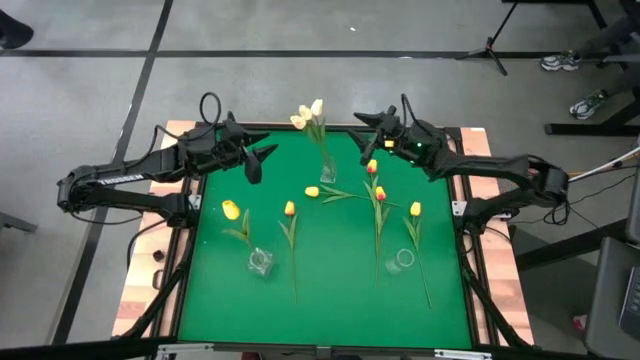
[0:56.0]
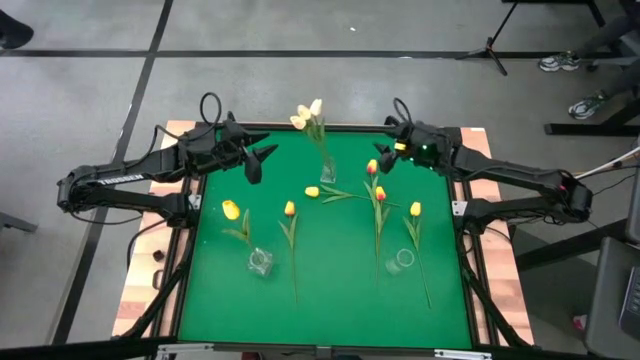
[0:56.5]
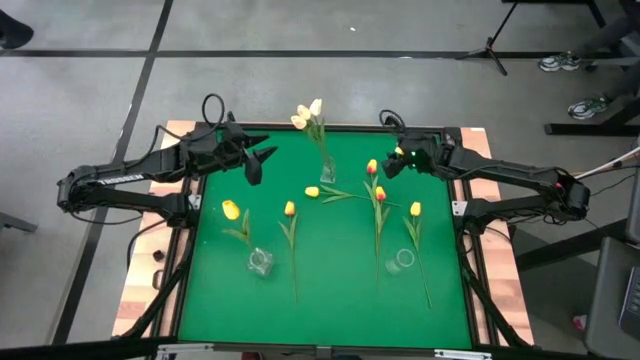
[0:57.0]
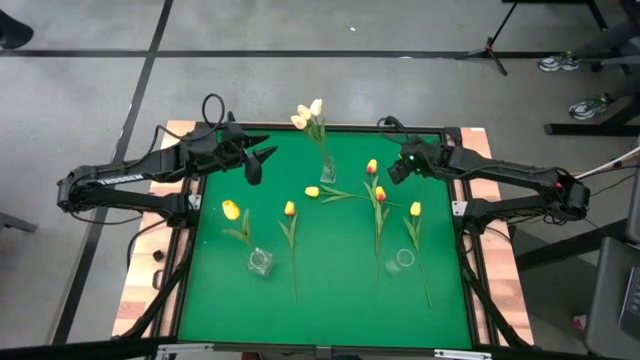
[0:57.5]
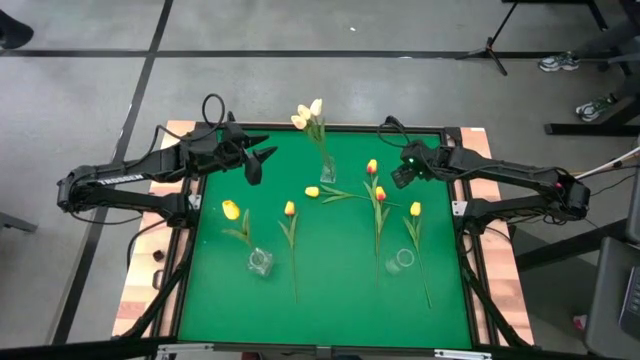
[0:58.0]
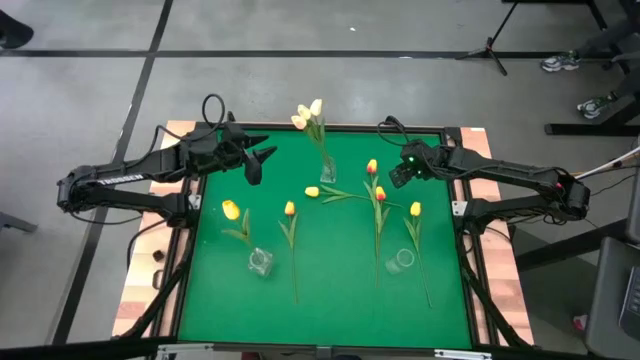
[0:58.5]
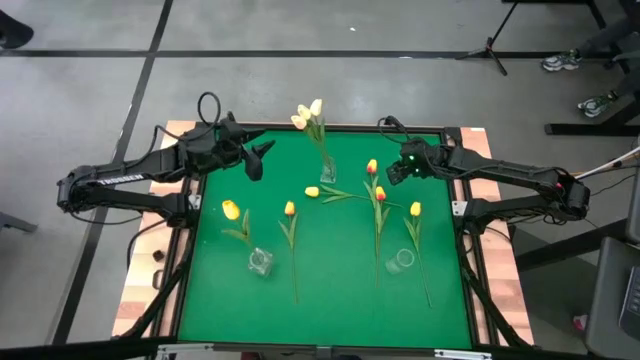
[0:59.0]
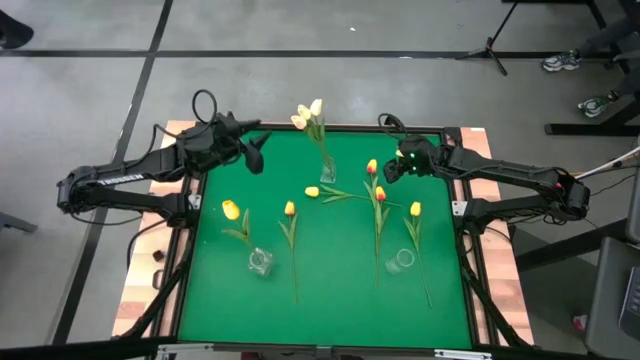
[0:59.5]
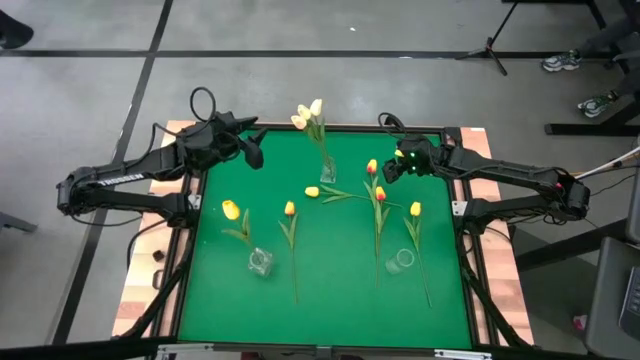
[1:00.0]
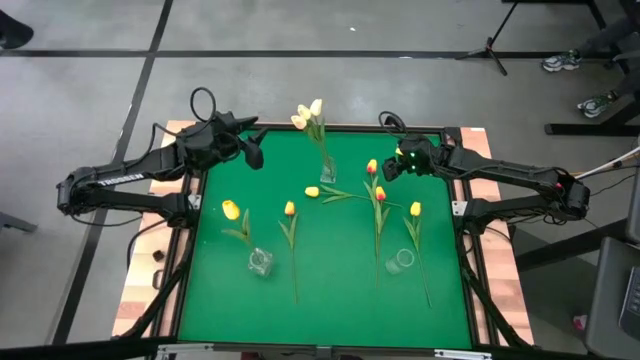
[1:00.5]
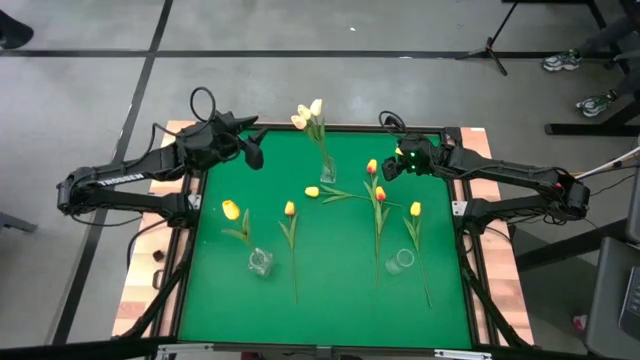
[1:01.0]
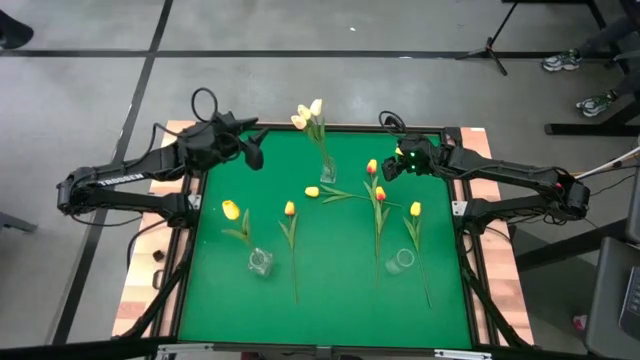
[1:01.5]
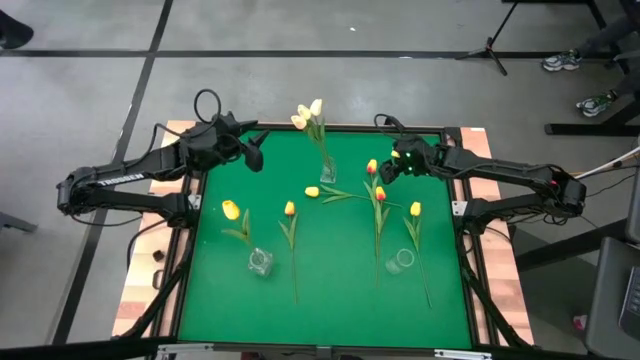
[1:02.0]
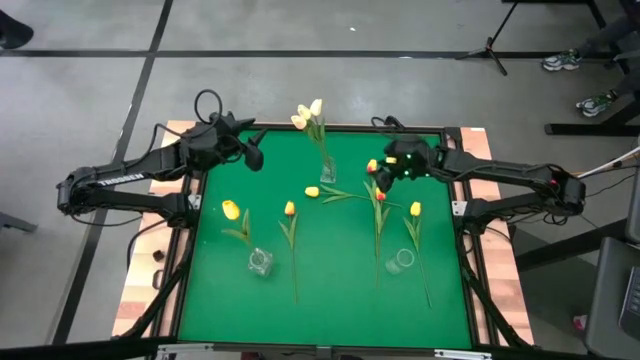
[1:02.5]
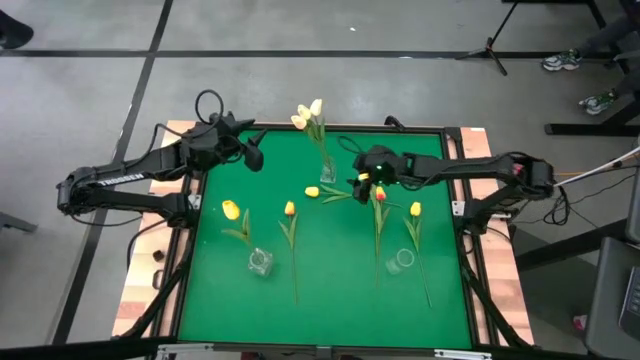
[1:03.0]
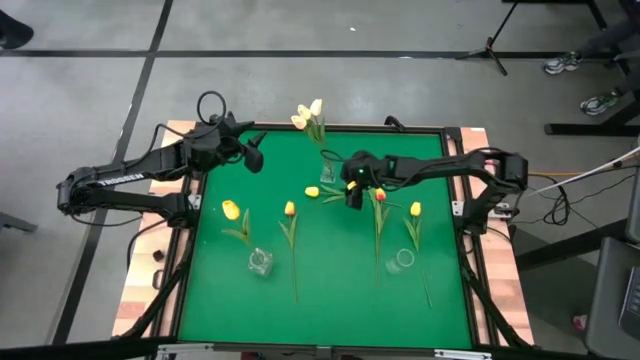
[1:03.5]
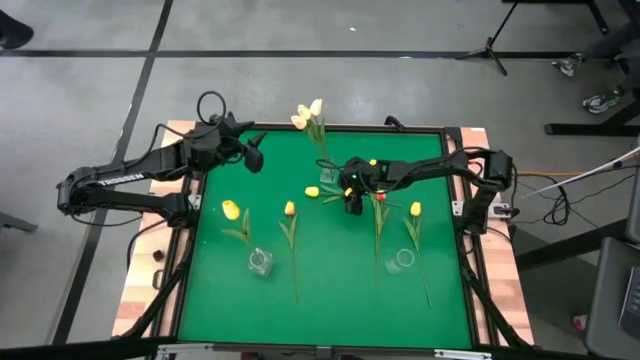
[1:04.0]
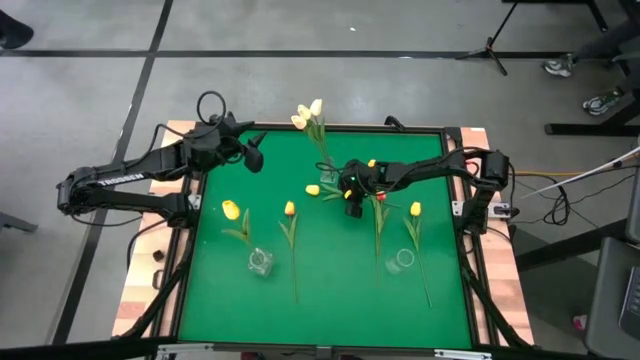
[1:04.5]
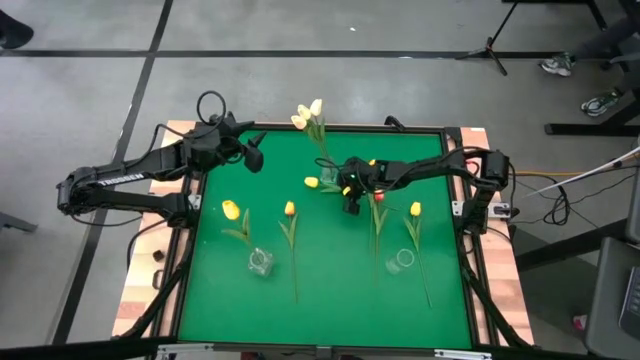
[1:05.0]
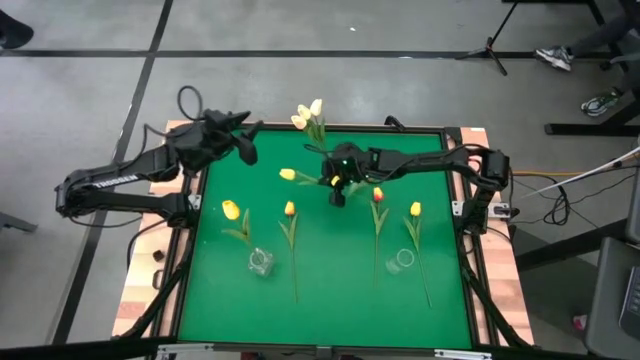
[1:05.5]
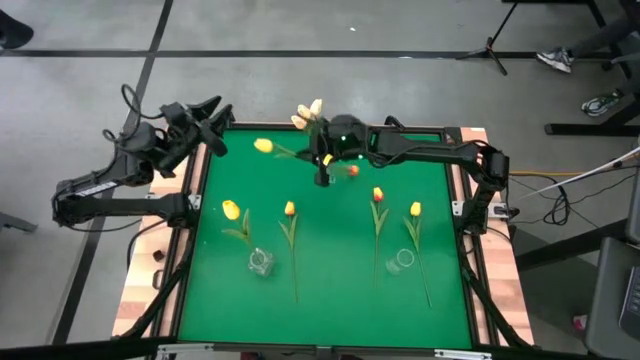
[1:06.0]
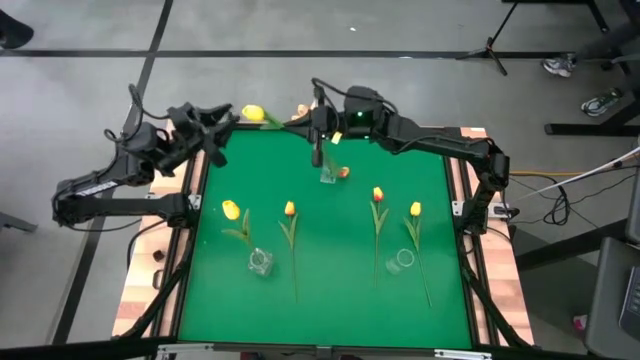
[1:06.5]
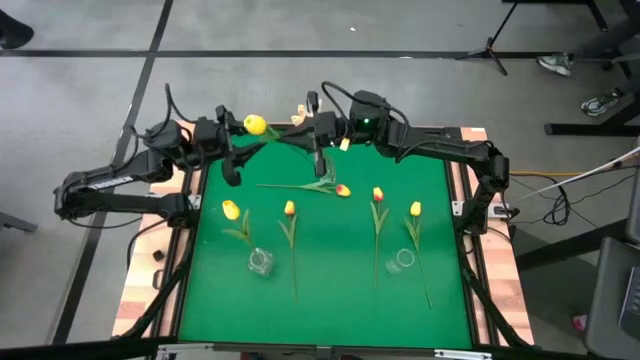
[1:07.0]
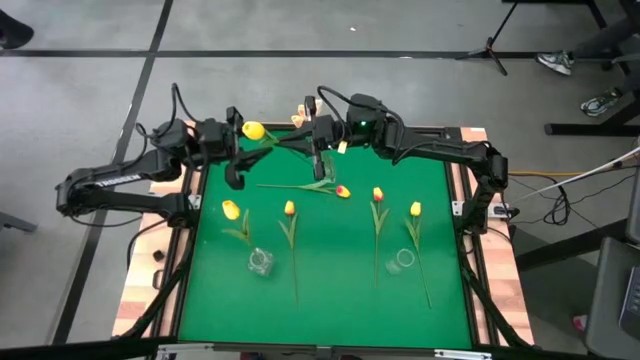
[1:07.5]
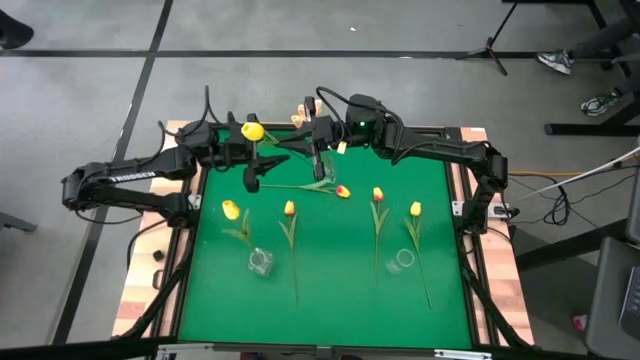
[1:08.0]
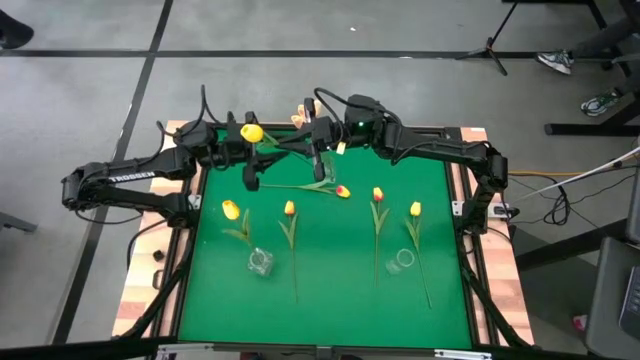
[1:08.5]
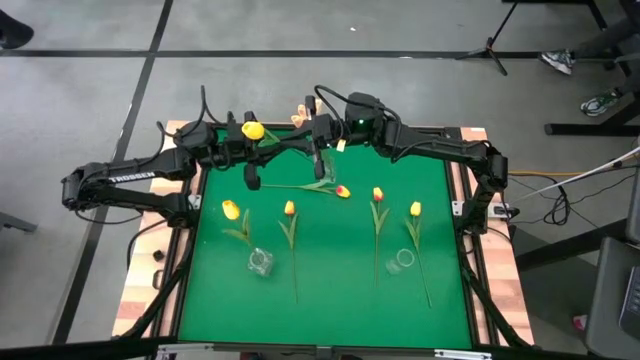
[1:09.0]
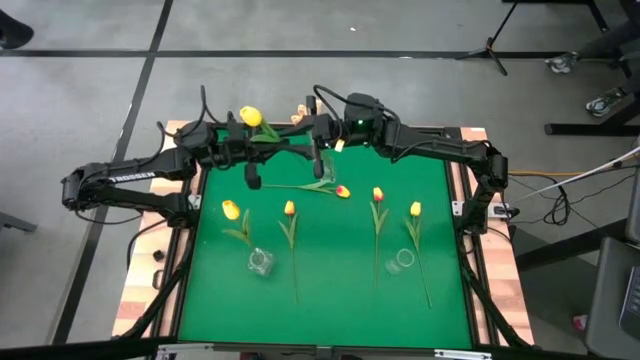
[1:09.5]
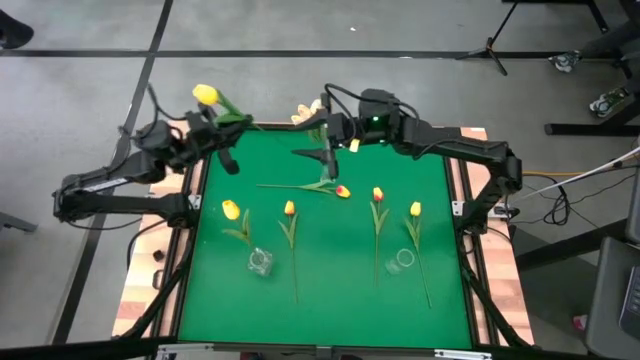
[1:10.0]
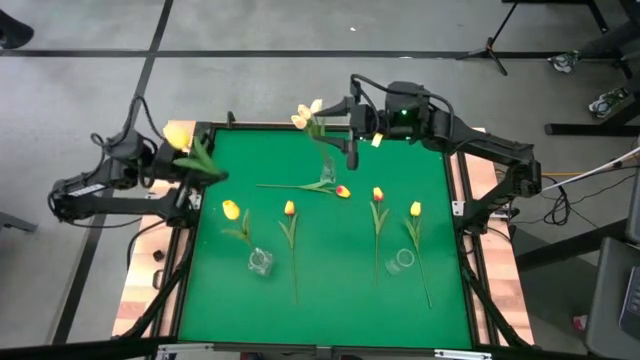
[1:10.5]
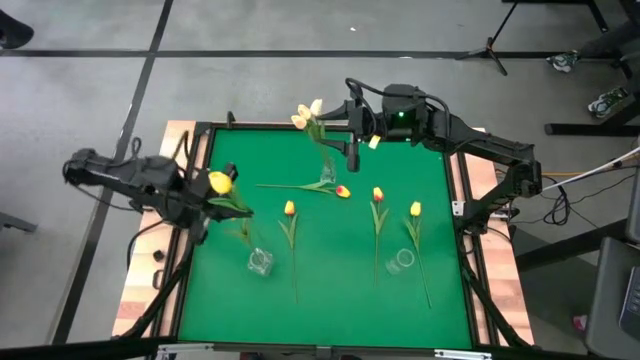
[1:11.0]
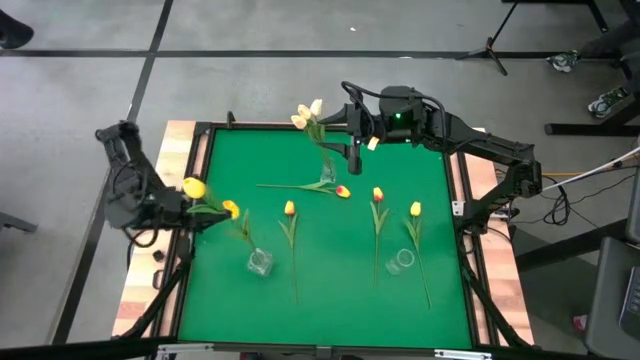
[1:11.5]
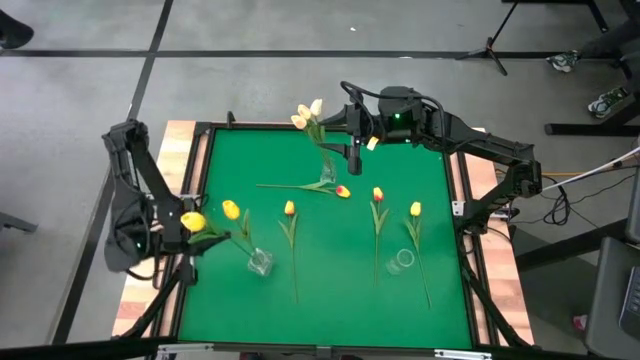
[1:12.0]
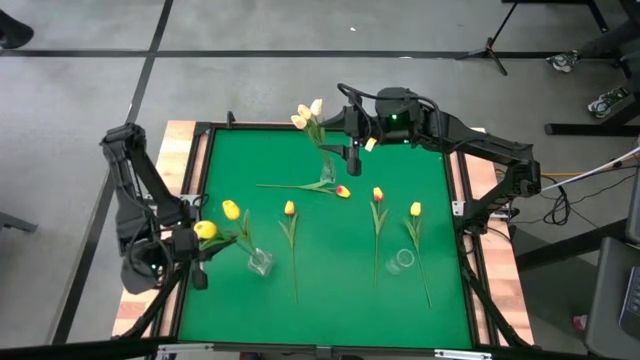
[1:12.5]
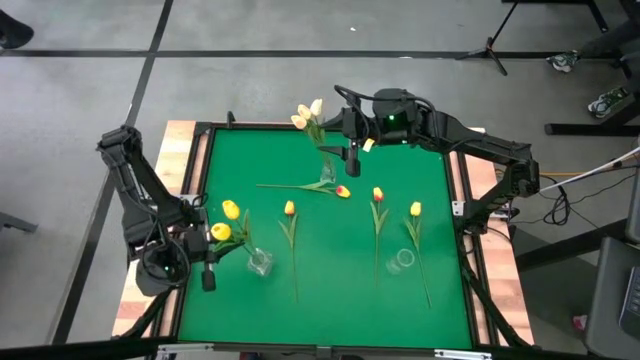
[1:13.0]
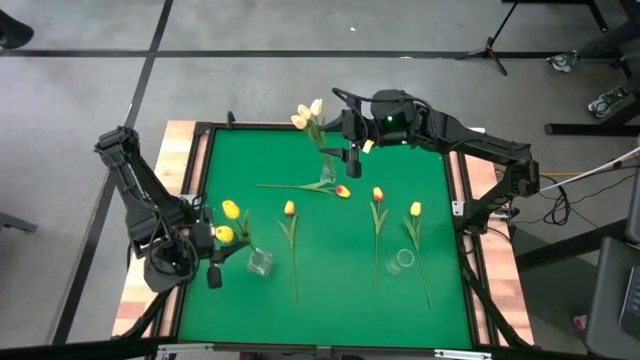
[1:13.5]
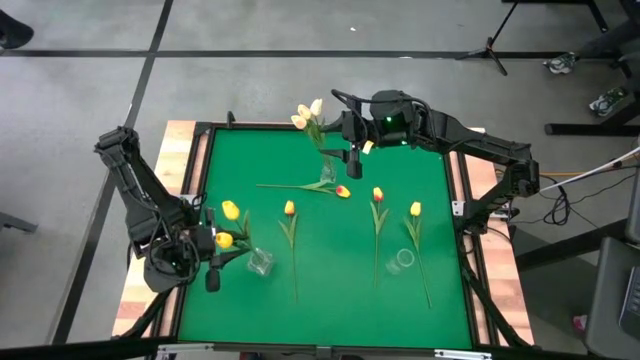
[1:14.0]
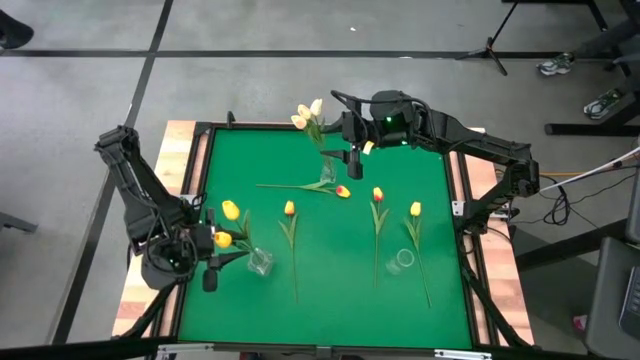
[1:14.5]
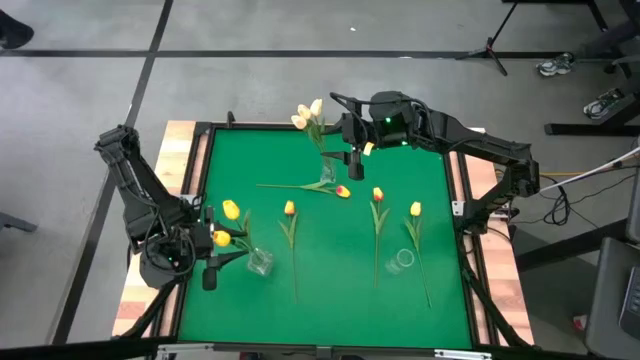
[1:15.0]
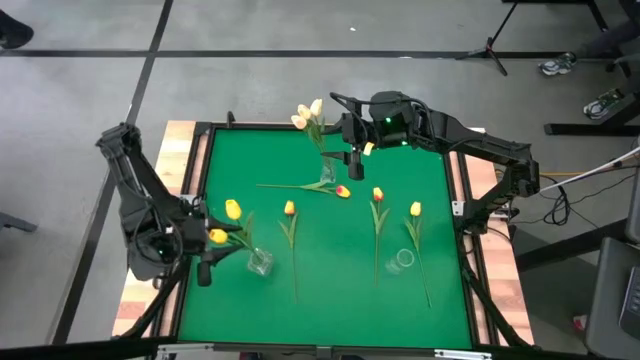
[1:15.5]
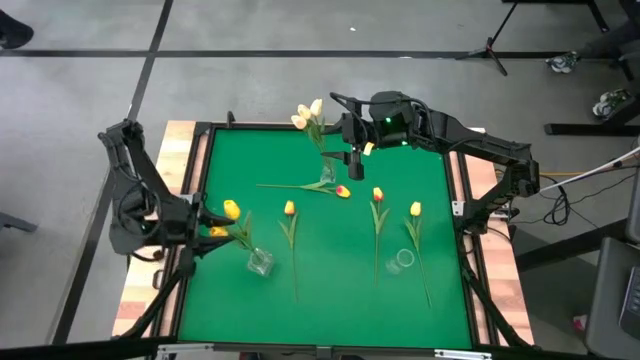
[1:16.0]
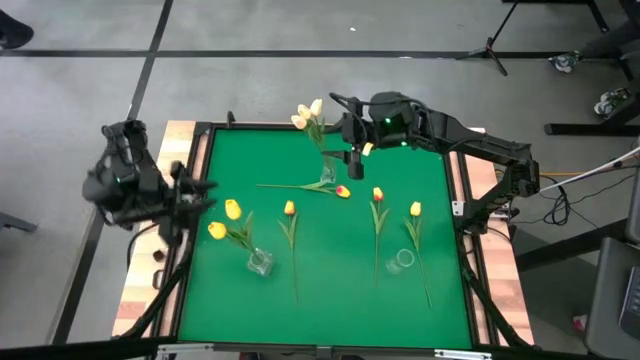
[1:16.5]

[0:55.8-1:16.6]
Task: Sort flowers into vase by color
Put the left yellow tulip into the bottom left transparent vase
